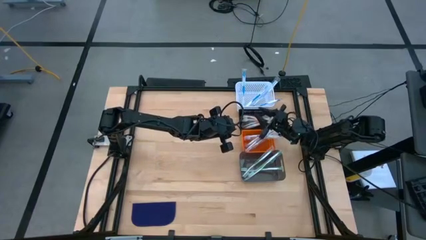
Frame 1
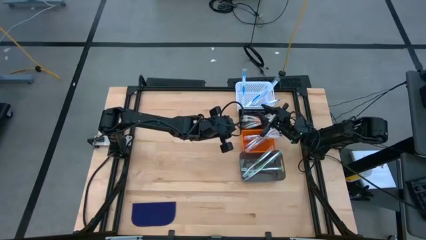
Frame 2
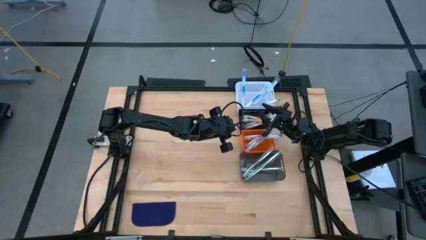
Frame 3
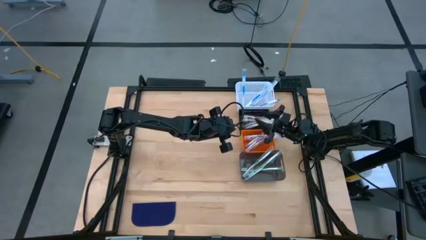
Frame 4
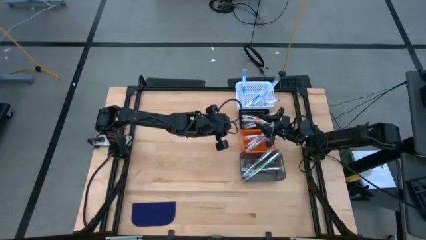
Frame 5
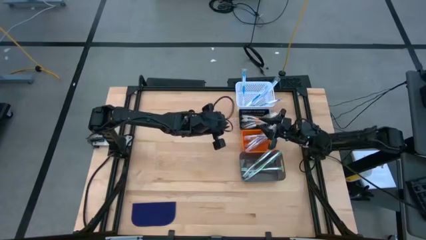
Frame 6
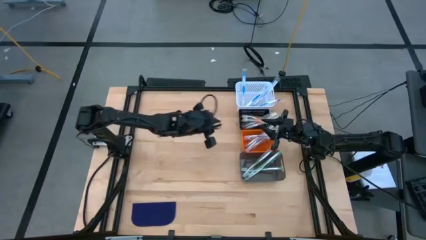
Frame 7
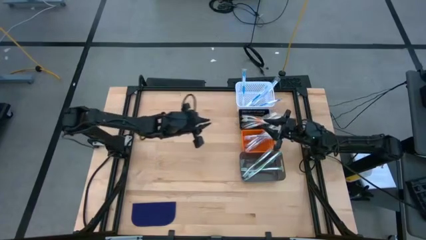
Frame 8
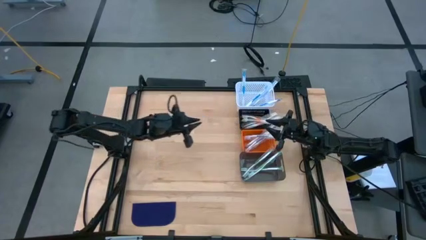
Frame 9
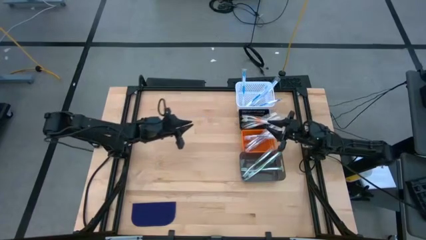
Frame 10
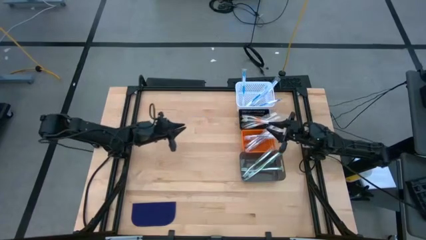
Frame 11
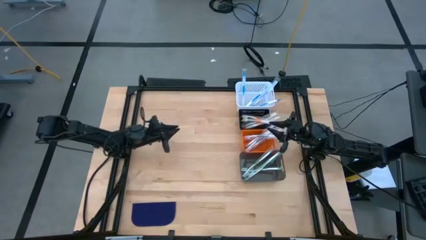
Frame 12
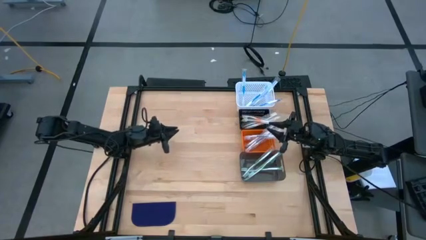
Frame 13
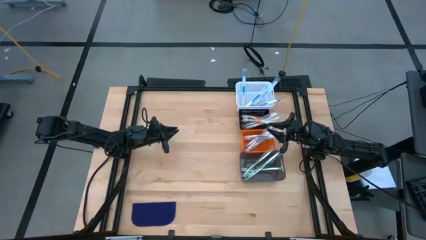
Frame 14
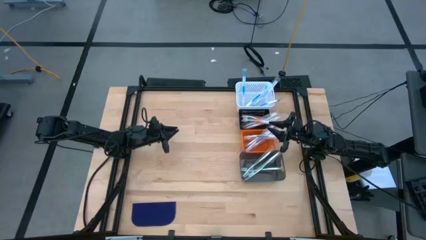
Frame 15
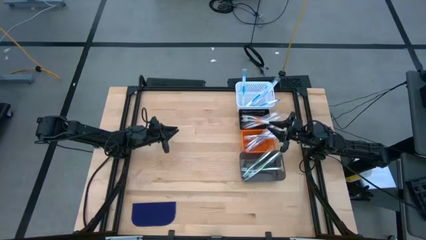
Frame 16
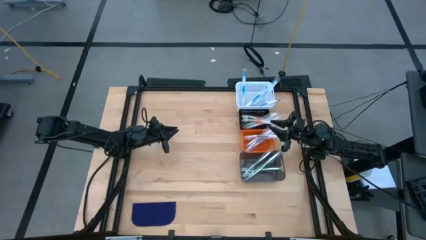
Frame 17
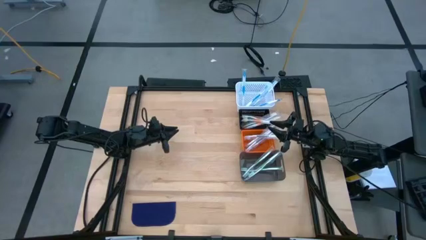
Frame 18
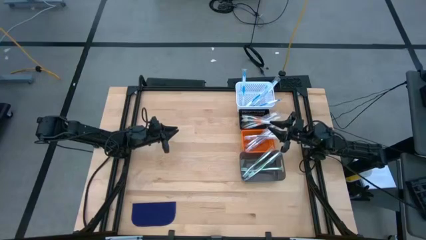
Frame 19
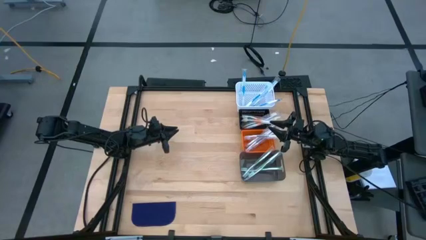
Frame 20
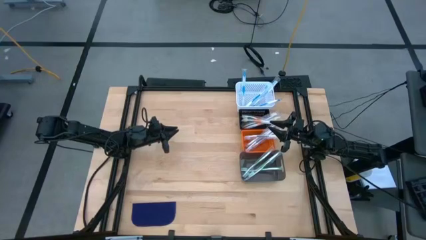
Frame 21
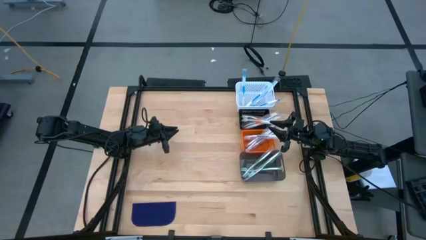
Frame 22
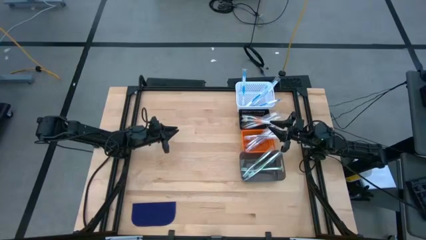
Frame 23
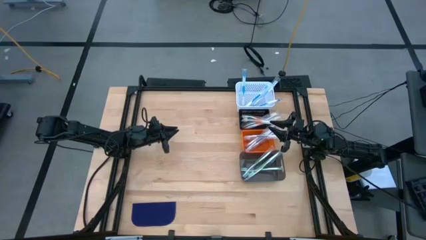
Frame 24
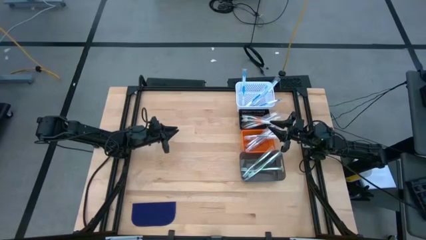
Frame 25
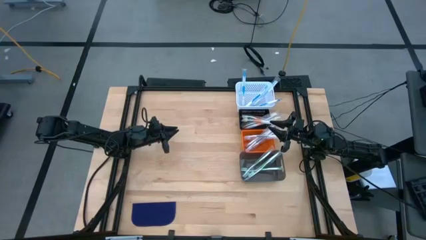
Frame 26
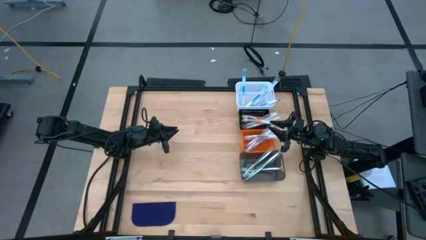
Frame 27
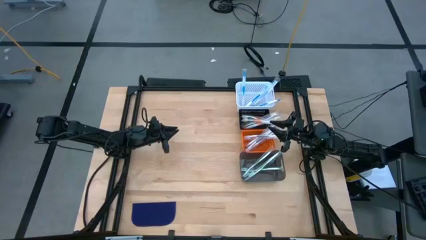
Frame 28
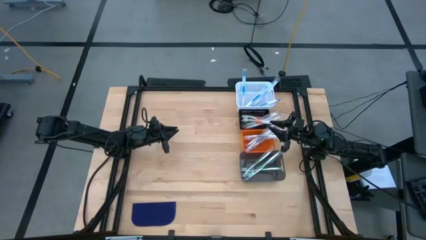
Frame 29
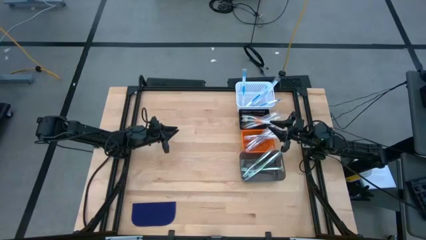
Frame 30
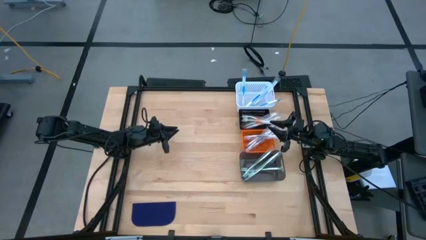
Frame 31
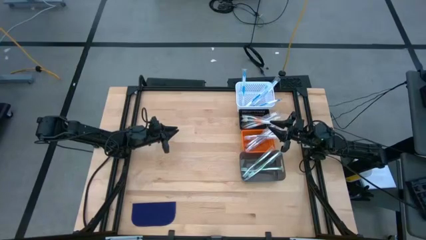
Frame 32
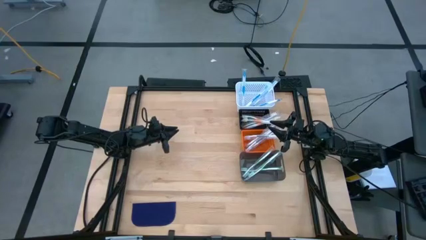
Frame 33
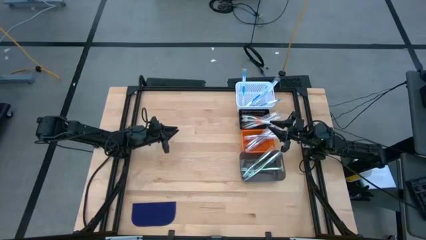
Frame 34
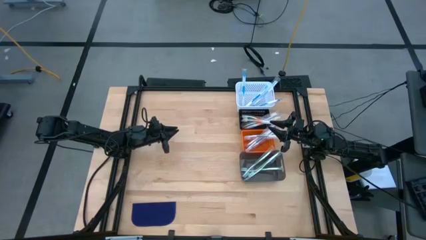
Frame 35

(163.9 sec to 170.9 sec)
Task: Pick & Place Toothbrushes
Return to Home Position

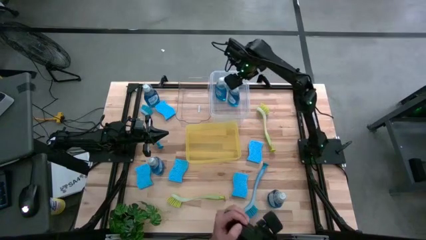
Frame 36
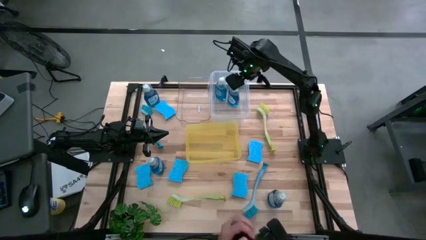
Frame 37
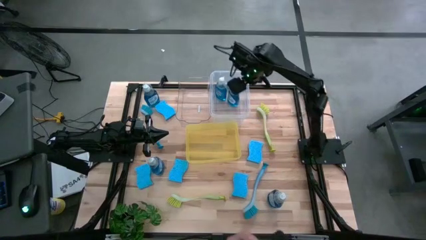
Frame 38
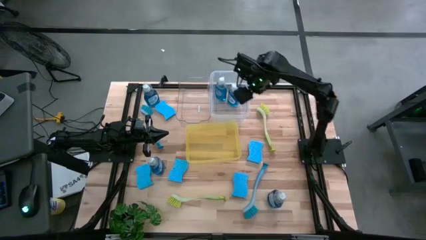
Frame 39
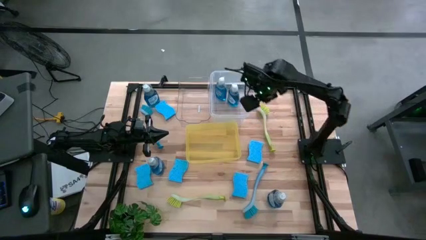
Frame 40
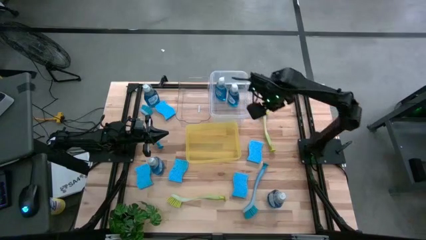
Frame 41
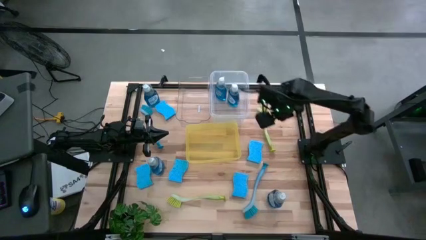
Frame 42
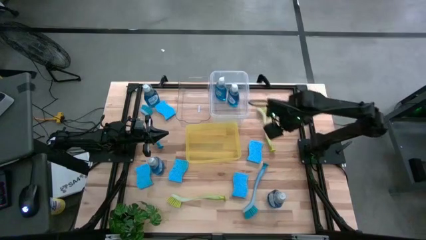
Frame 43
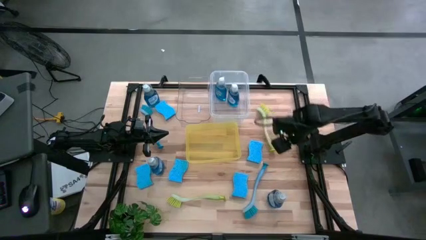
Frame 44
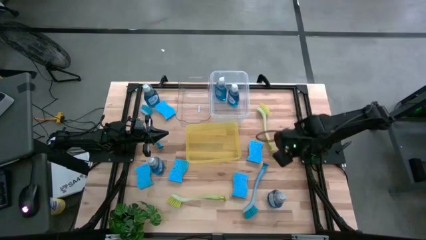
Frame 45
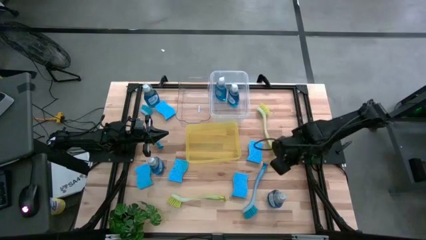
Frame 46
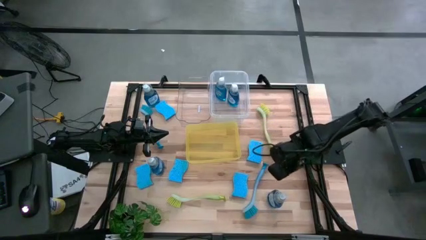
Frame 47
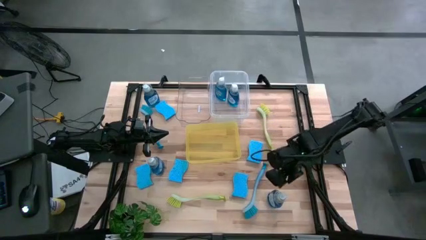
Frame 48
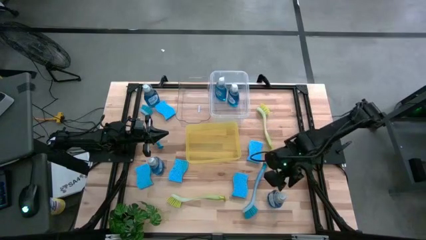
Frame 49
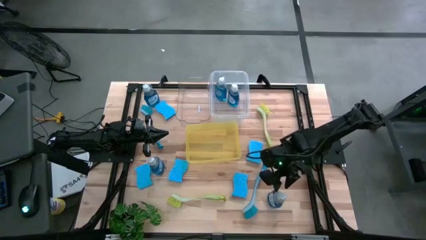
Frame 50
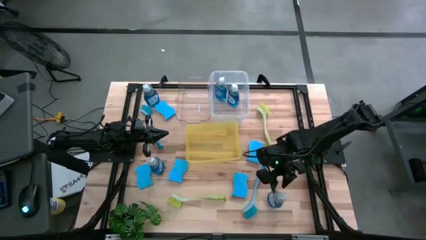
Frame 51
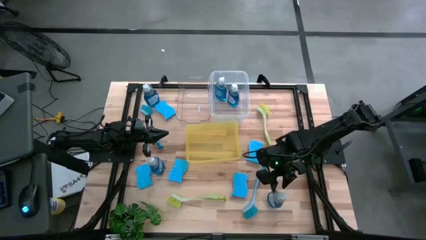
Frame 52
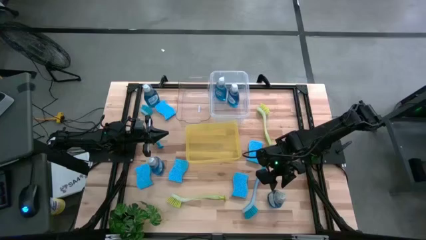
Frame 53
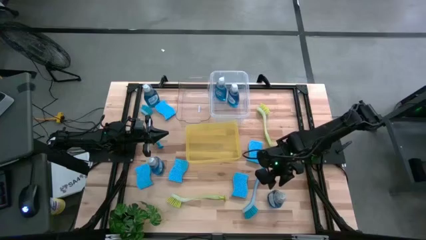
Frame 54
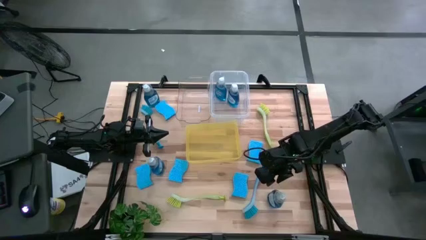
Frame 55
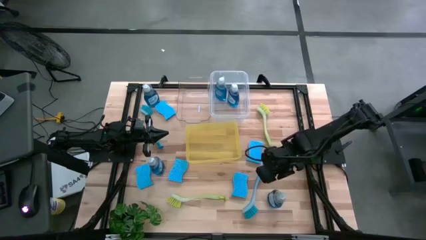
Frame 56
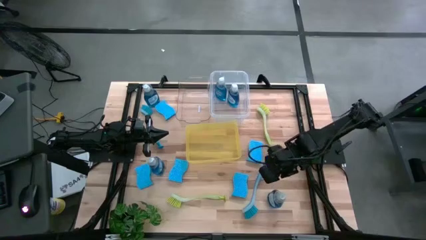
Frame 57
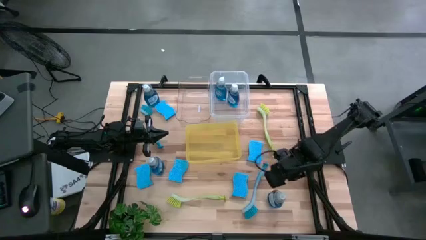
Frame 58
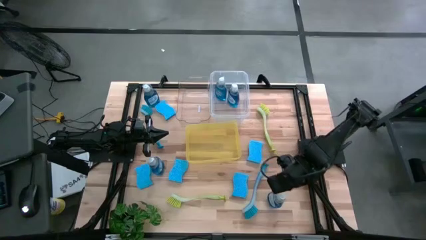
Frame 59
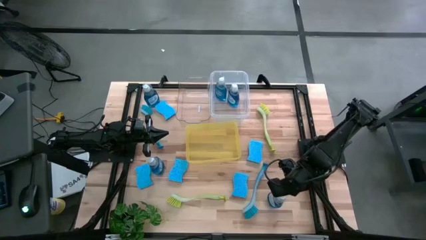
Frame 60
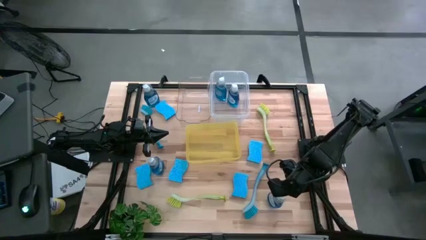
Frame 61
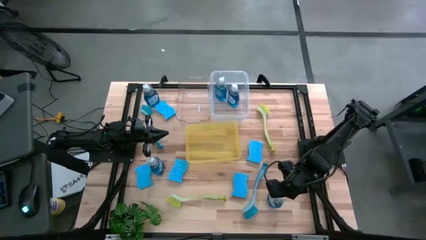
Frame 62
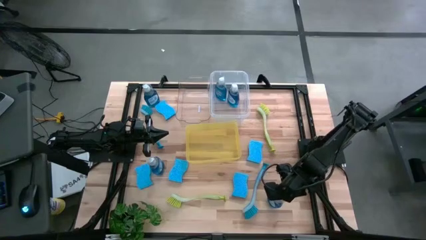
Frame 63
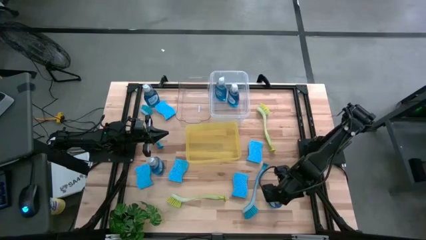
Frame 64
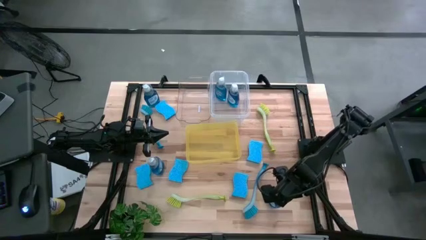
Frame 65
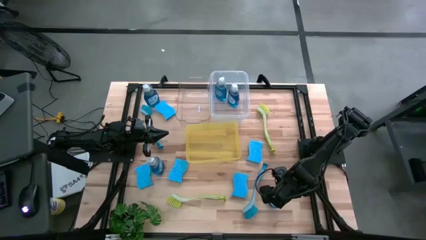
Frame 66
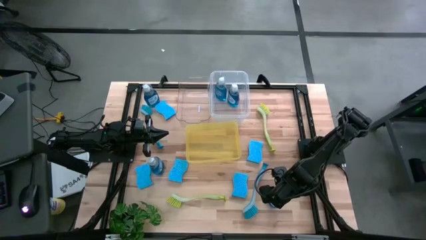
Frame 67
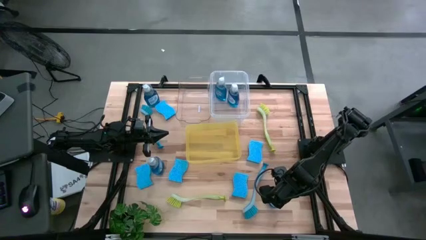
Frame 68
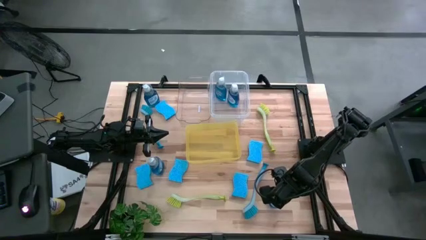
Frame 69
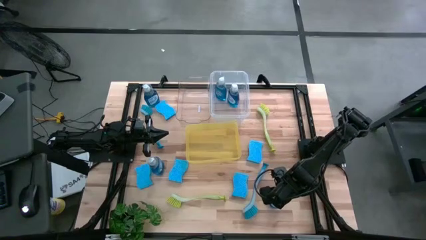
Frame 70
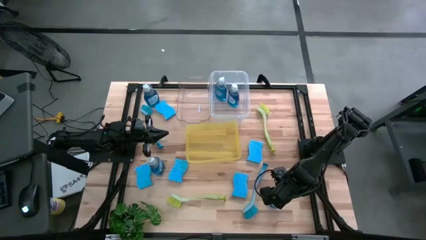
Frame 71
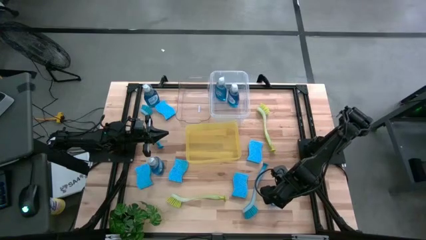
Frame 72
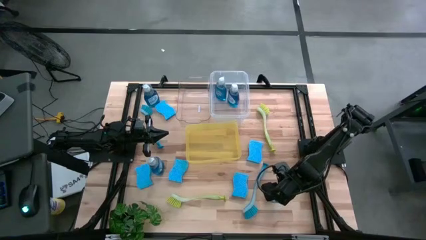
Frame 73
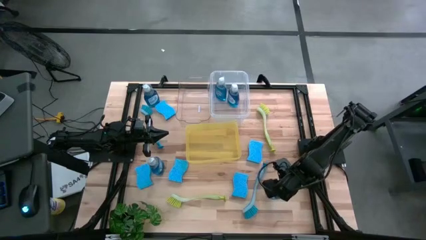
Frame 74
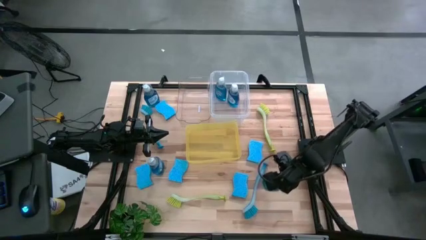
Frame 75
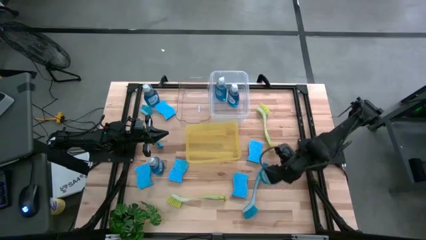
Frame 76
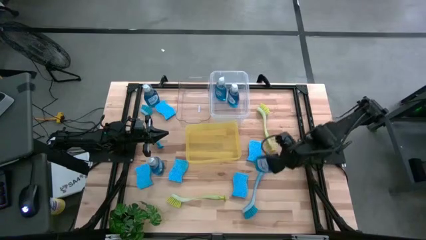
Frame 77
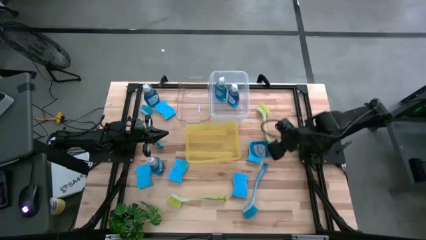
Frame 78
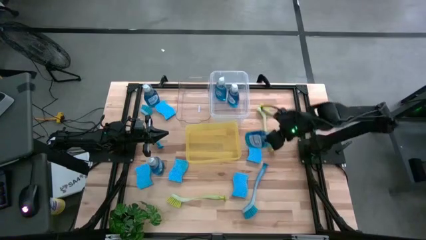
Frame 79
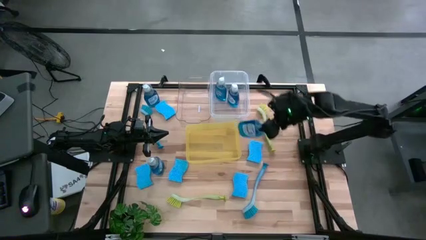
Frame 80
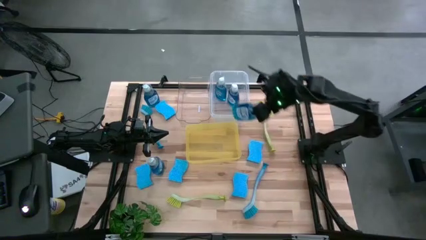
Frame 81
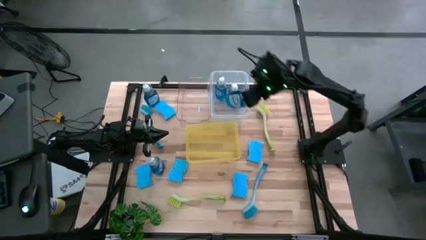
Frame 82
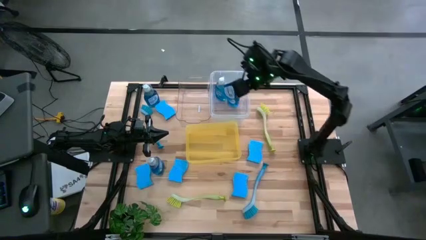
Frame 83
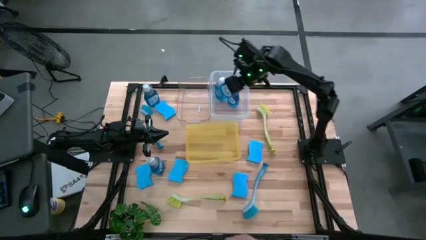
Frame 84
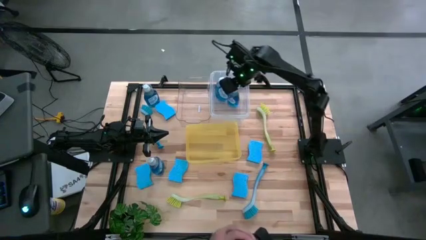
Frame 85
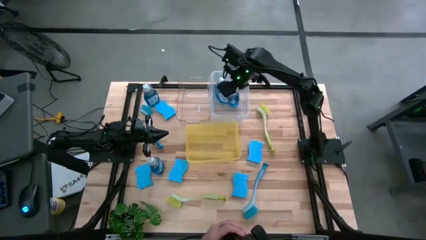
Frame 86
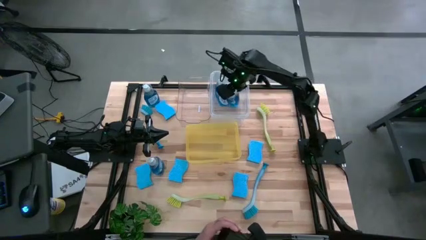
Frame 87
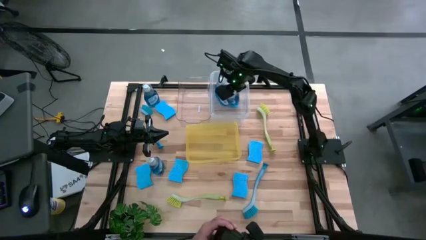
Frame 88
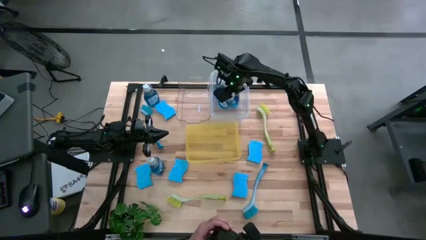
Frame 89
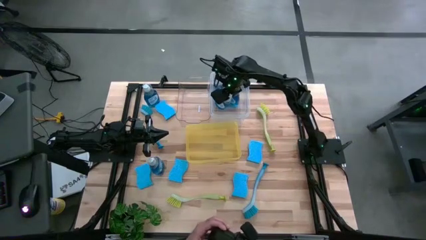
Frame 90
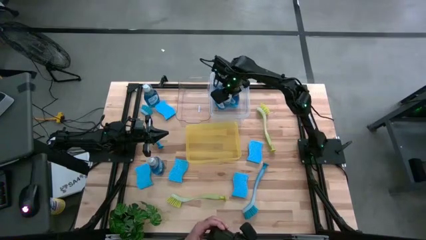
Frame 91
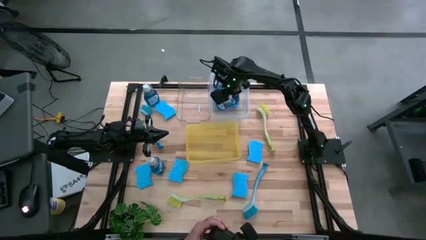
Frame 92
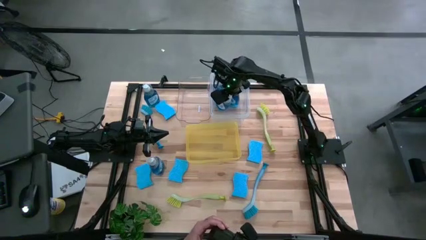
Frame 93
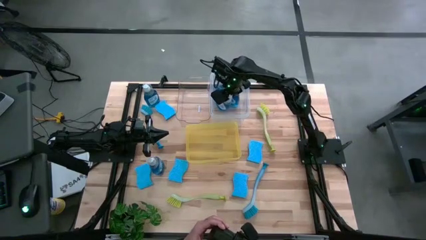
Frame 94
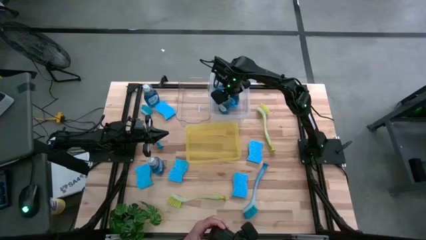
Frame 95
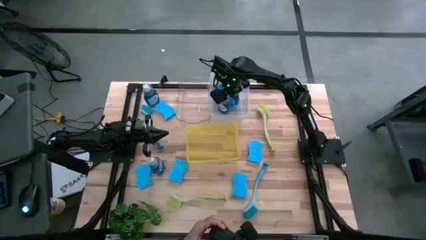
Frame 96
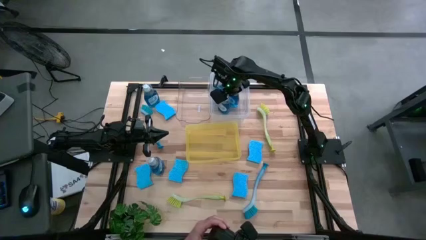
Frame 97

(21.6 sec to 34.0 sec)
Task: Pick & Place Kitchen Sink Supplies
Put the blue dishwasher liquid into the white bin
